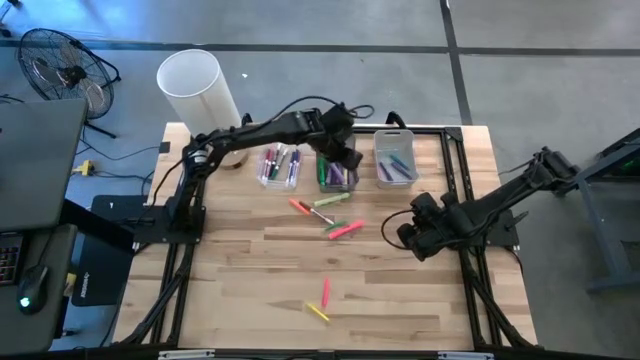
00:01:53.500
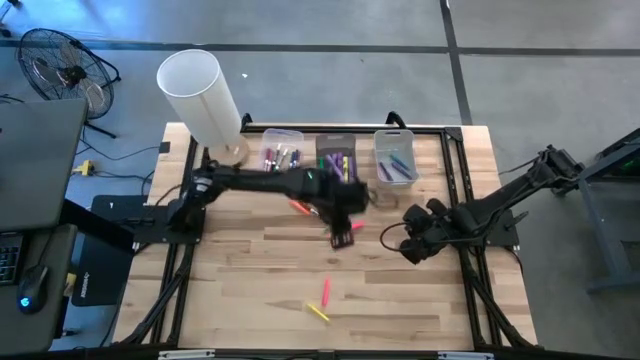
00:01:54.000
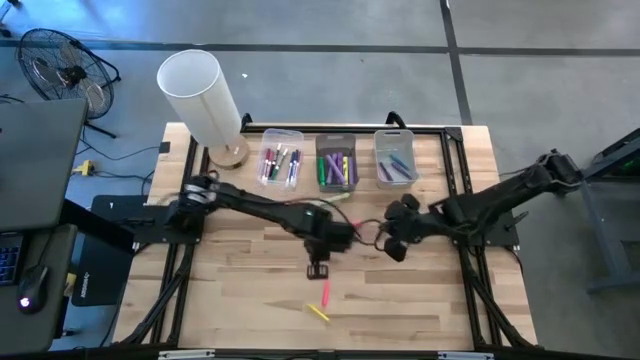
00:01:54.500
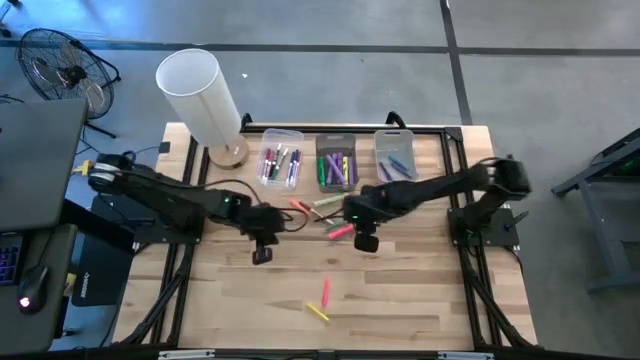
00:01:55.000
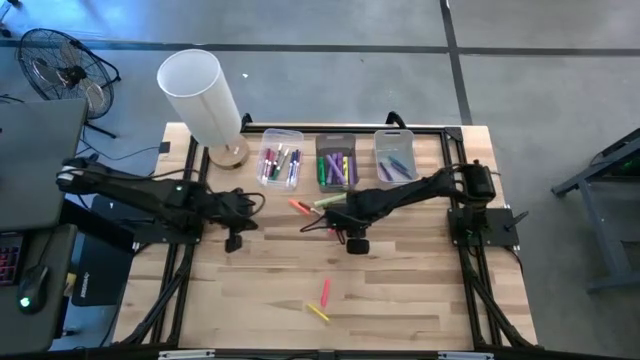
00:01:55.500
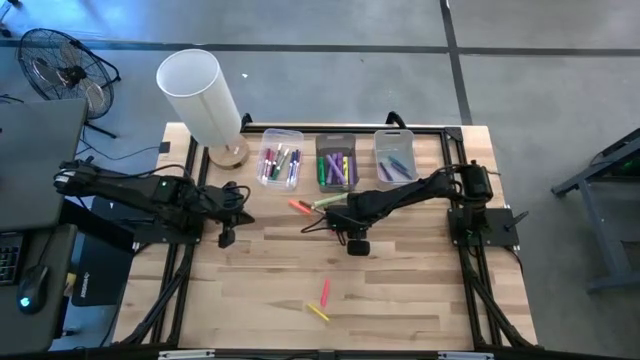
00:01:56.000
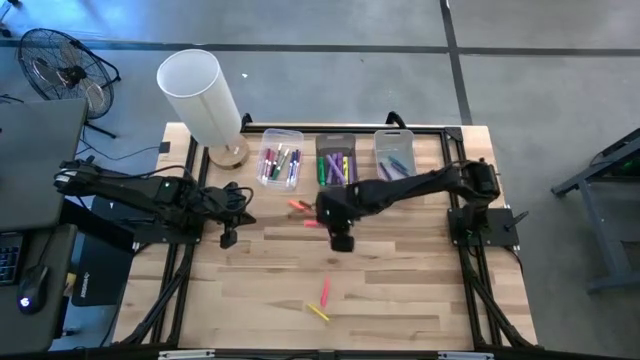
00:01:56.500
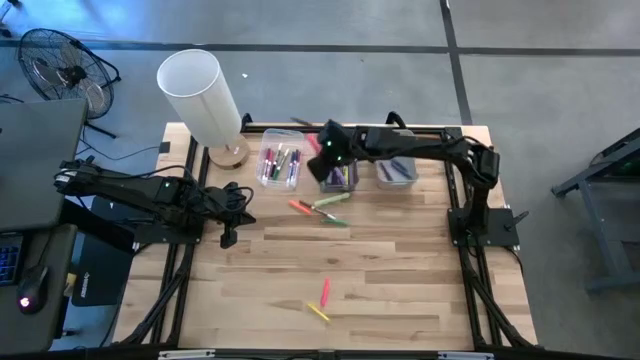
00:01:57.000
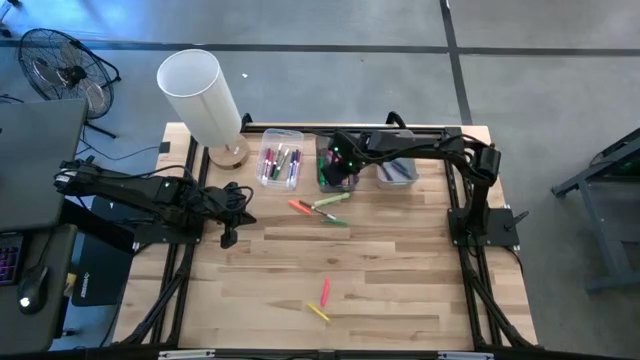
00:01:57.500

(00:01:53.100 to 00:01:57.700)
Task: Pick & Place Markers
Put the pink highlighter into the black bin

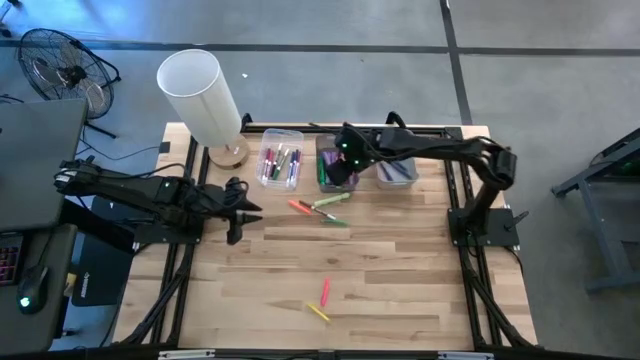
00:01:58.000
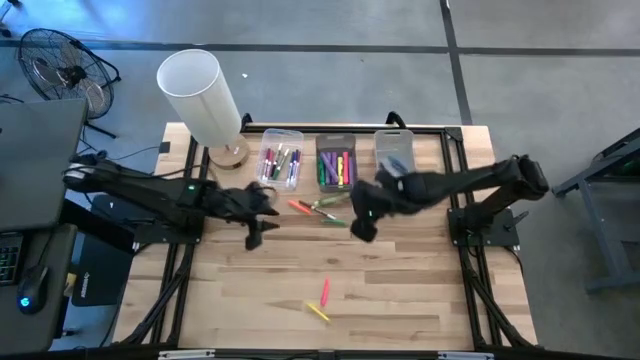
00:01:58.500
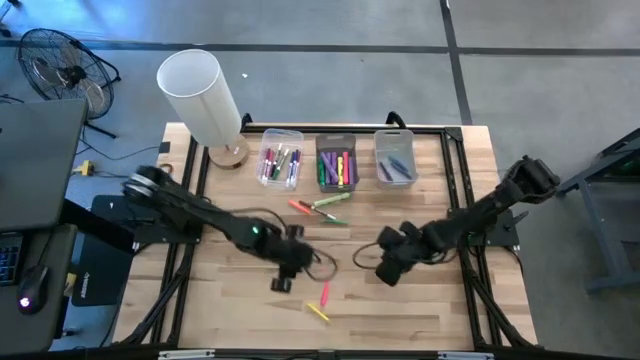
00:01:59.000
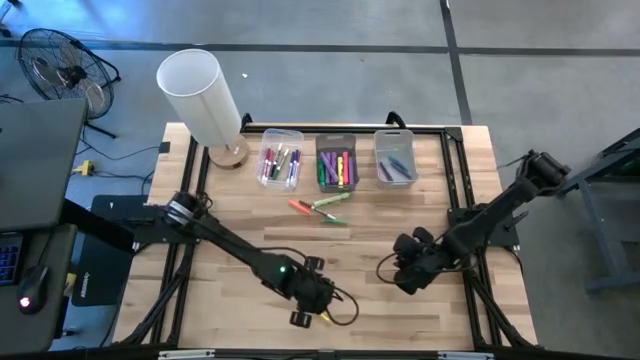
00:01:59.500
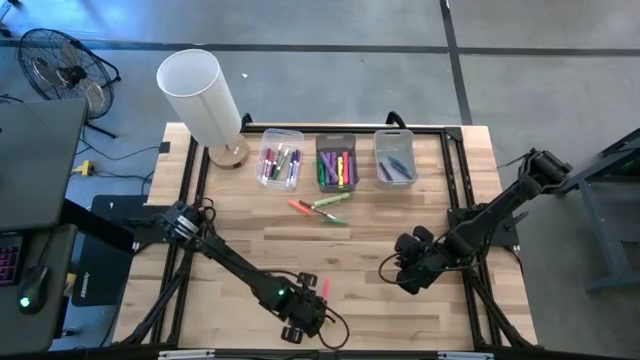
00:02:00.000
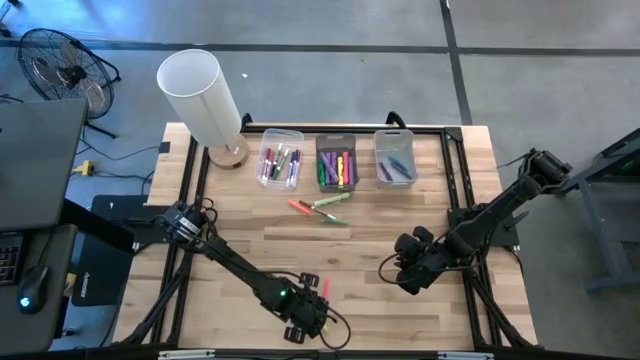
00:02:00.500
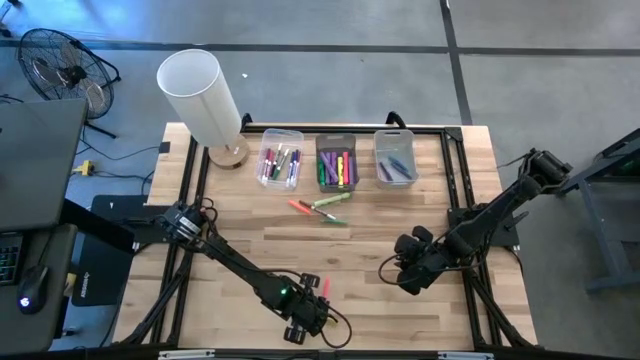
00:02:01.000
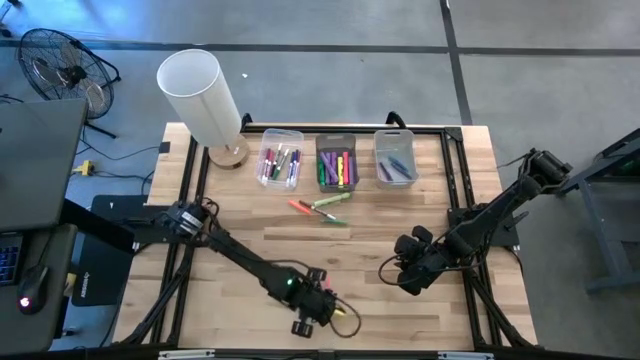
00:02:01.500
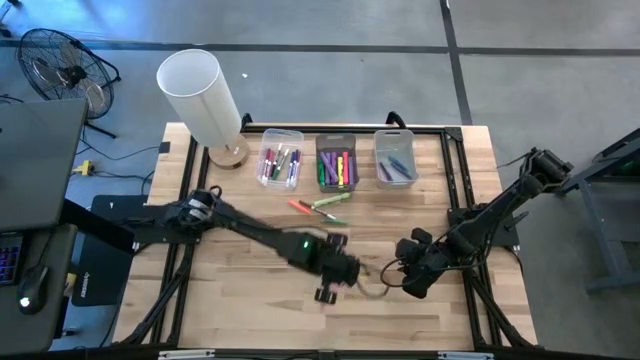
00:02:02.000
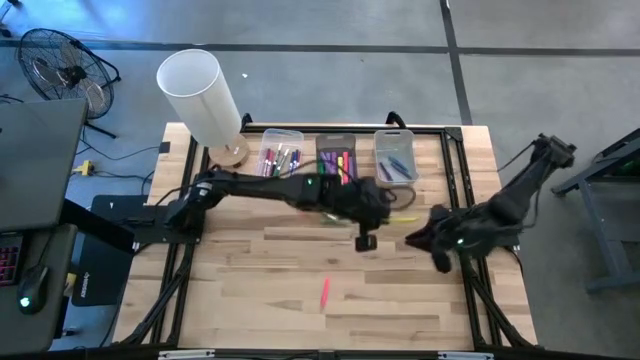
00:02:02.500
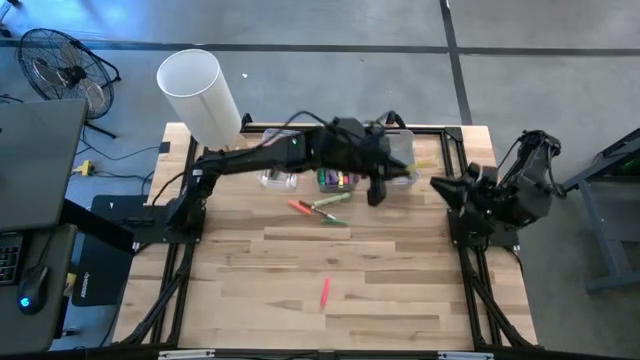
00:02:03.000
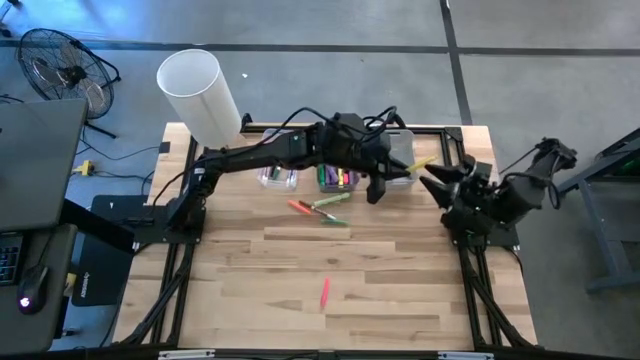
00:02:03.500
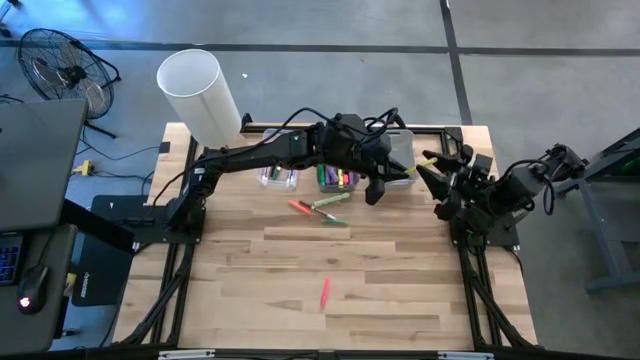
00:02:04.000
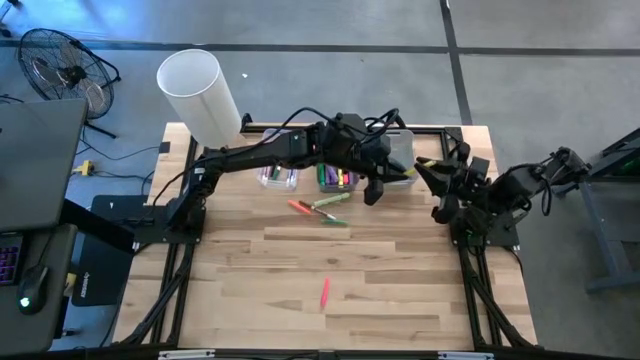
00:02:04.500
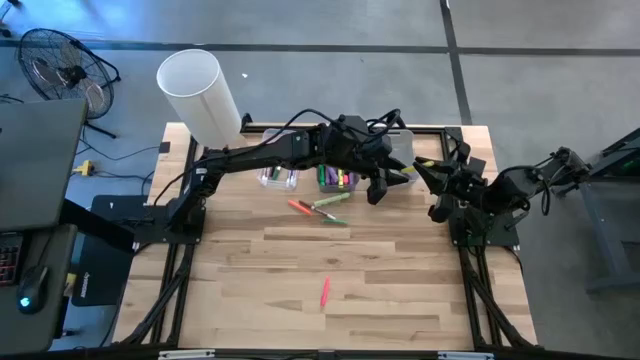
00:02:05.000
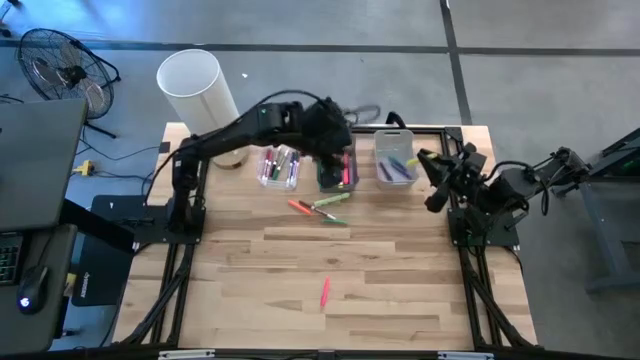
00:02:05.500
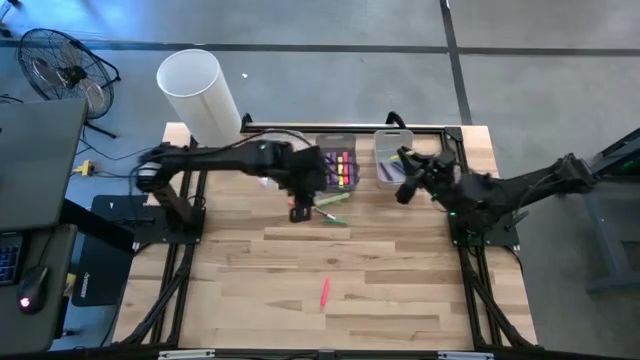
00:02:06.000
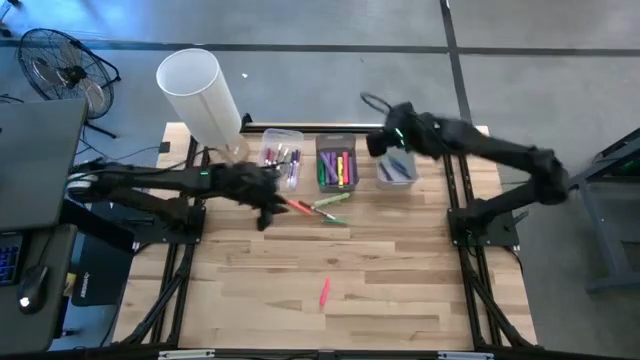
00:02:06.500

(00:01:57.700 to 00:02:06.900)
Put the yellow pen into the gray bin

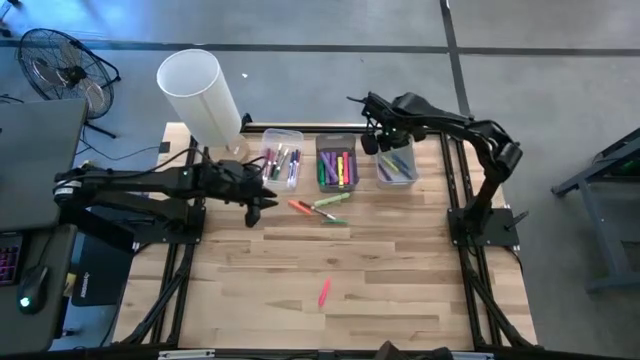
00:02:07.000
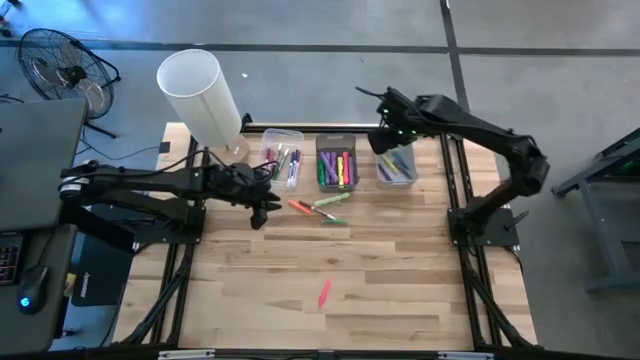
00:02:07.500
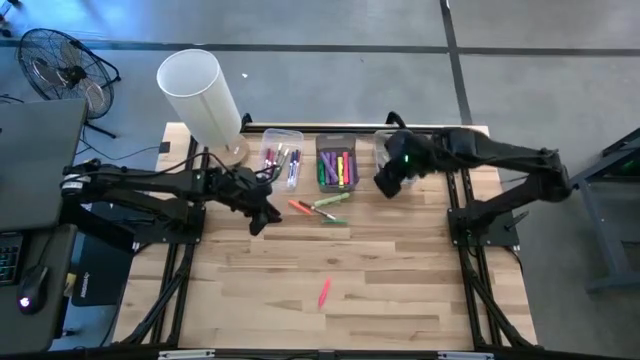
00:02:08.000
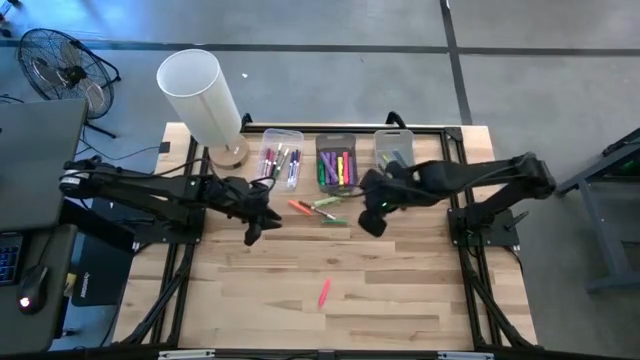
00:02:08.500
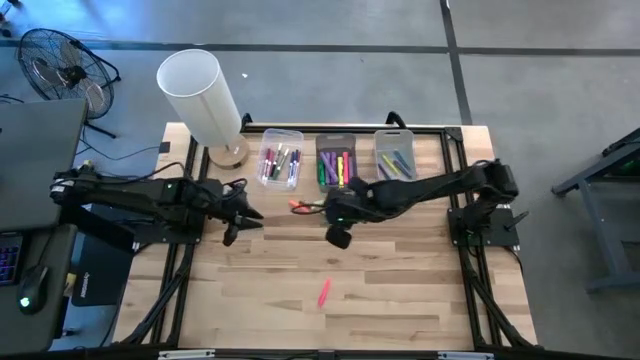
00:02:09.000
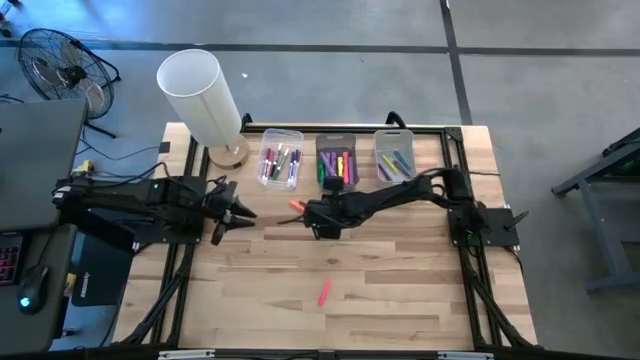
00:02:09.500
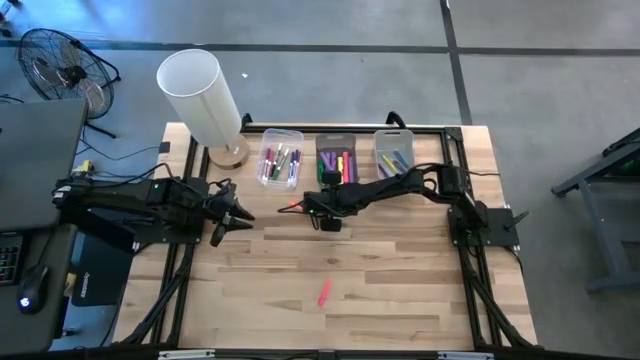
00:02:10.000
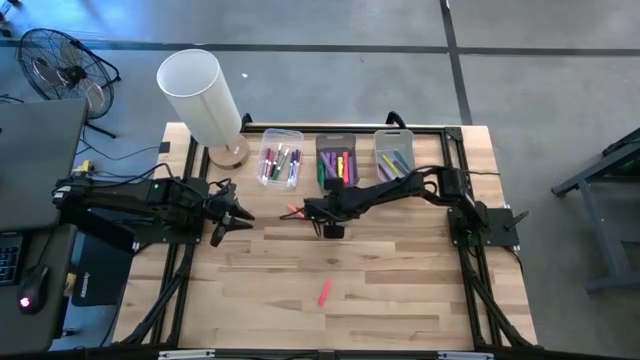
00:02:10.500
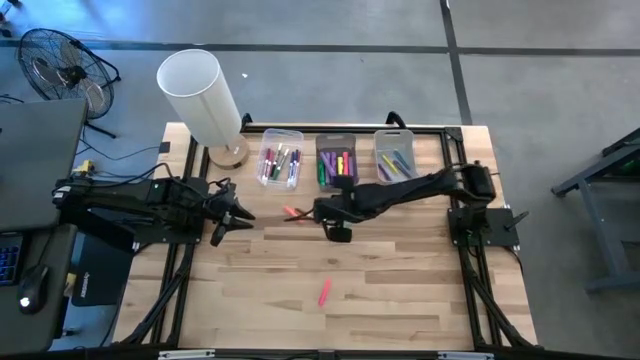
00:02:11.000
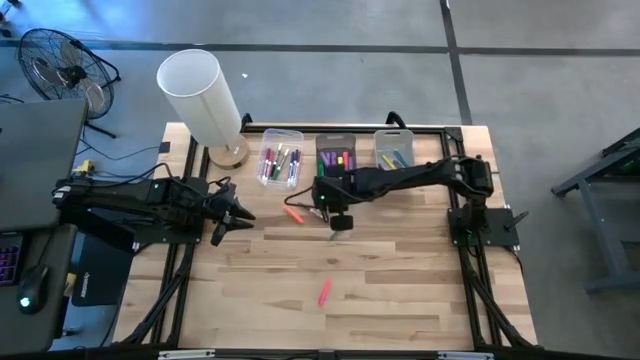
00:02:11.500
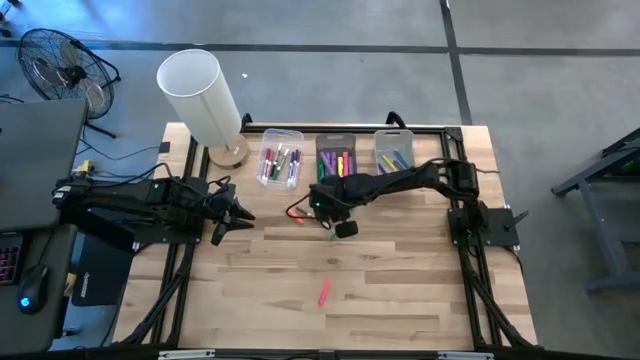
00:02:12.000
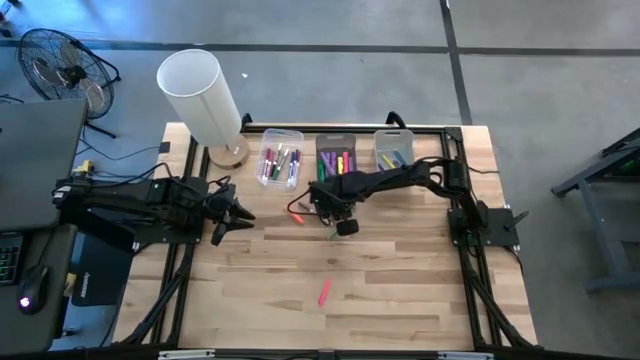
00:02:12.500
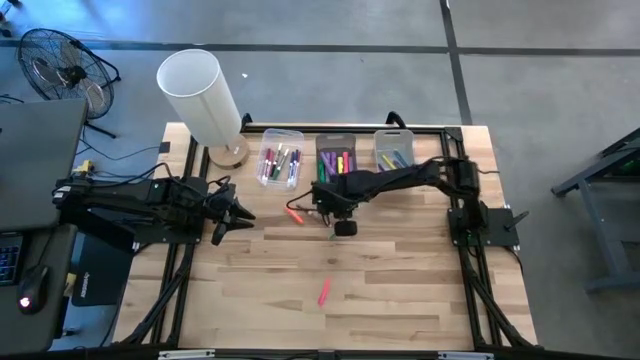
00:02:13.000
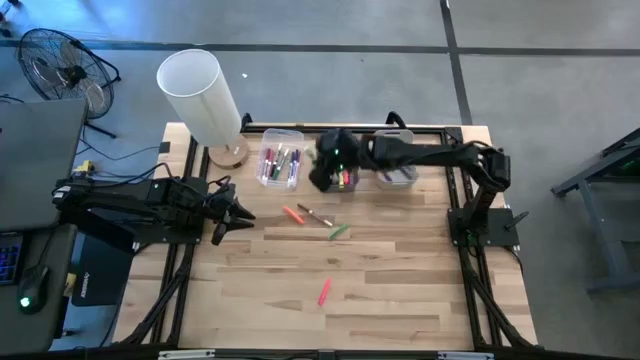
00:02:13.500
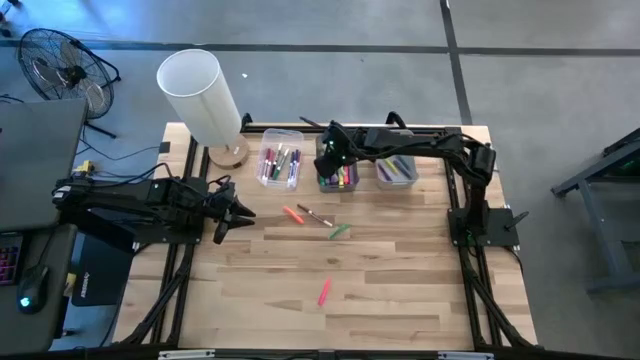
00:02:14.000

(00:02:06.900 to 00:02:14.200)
Put the light green highlighter into the black bin
